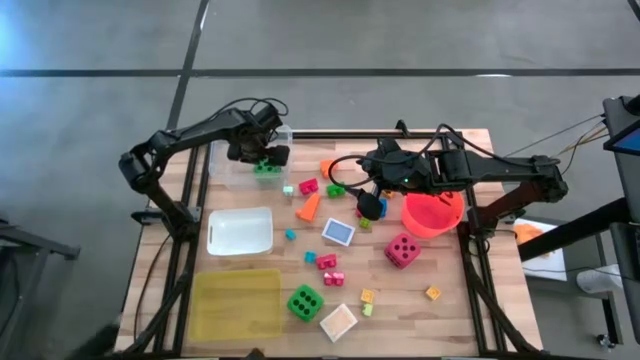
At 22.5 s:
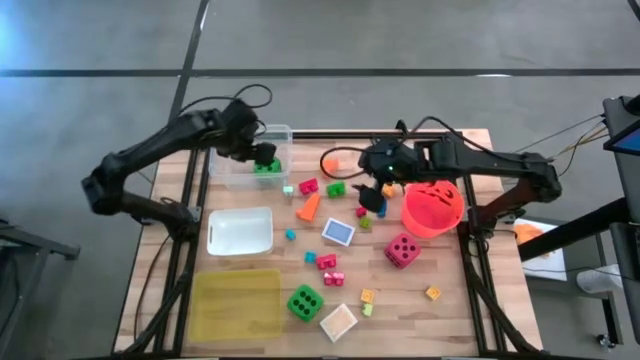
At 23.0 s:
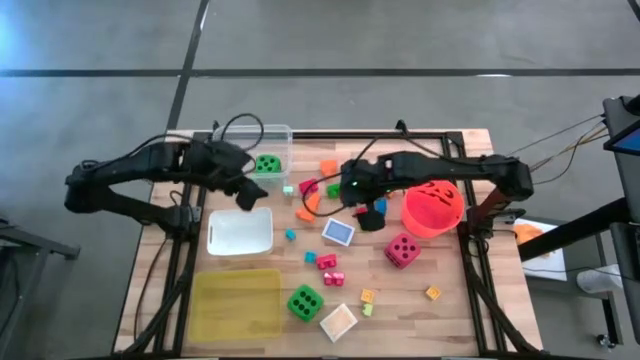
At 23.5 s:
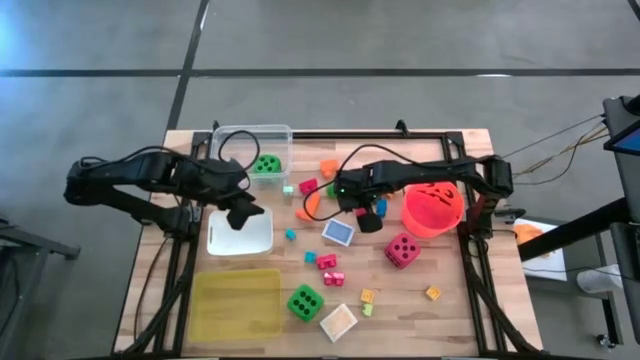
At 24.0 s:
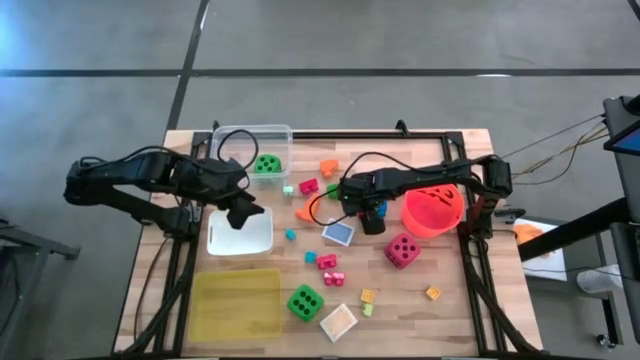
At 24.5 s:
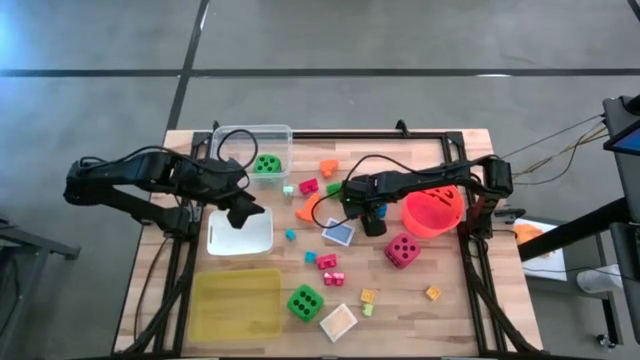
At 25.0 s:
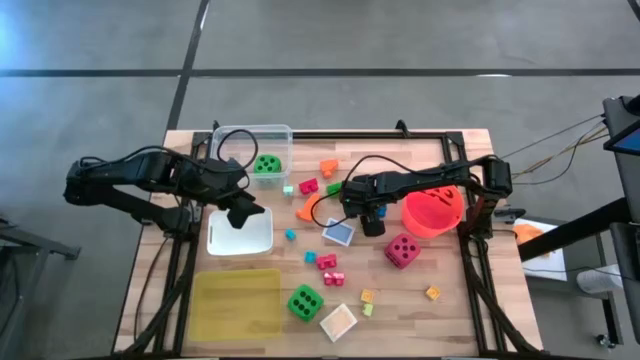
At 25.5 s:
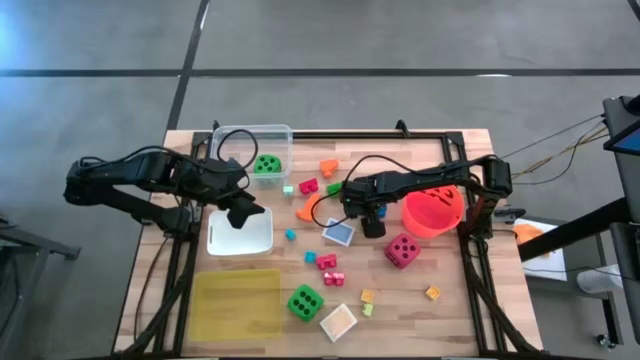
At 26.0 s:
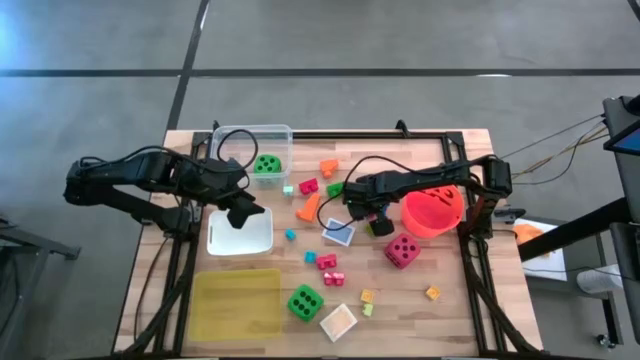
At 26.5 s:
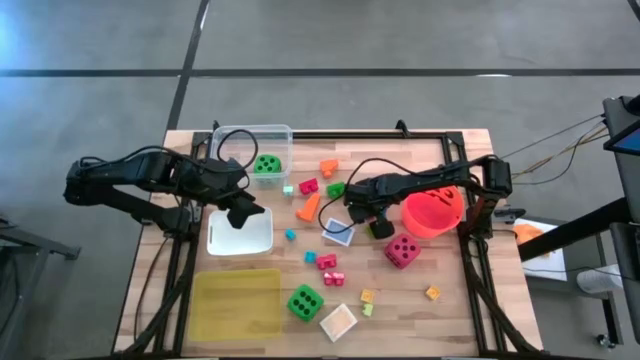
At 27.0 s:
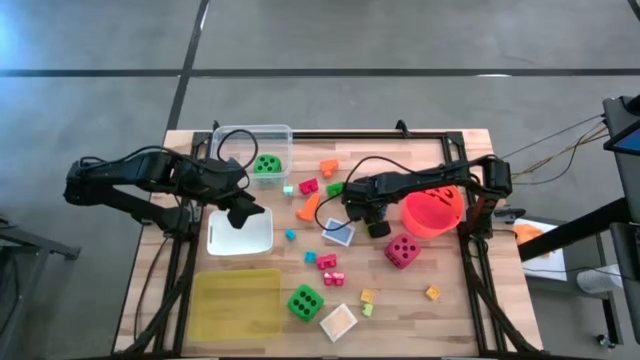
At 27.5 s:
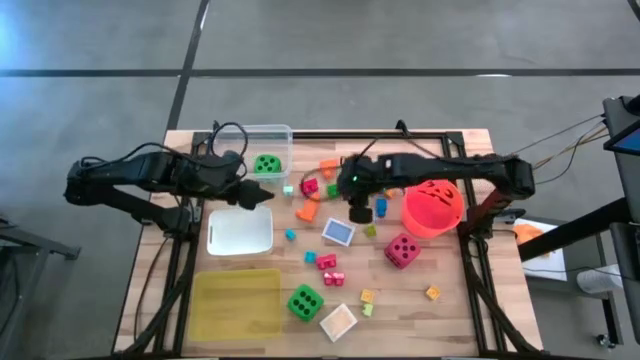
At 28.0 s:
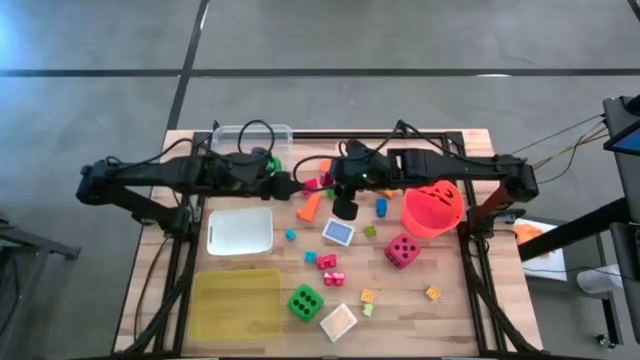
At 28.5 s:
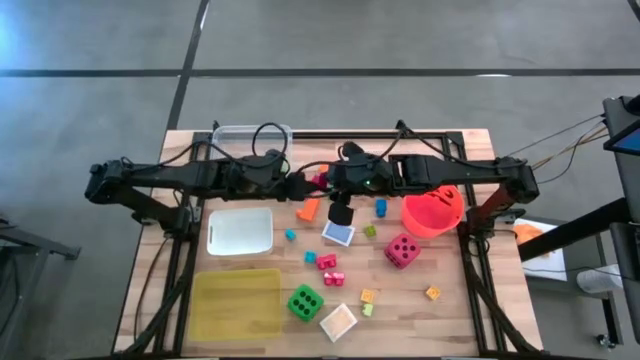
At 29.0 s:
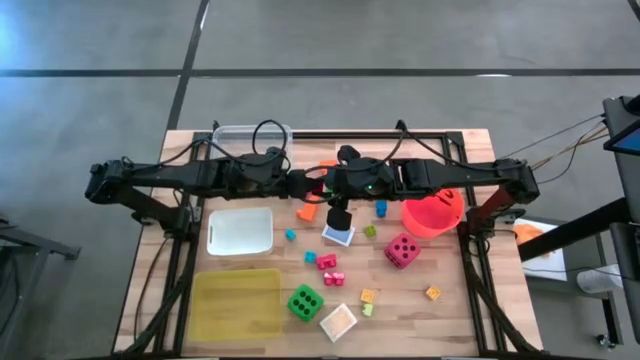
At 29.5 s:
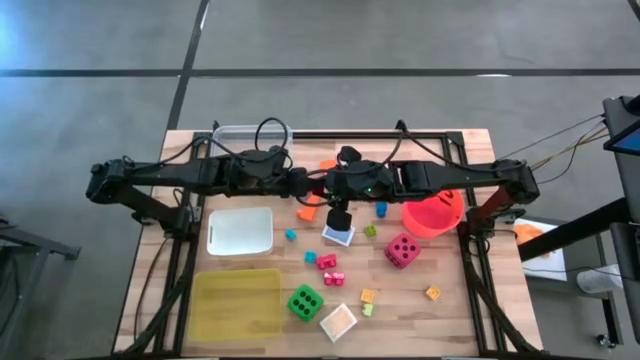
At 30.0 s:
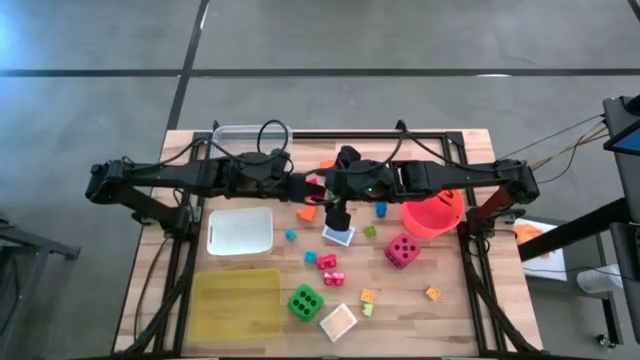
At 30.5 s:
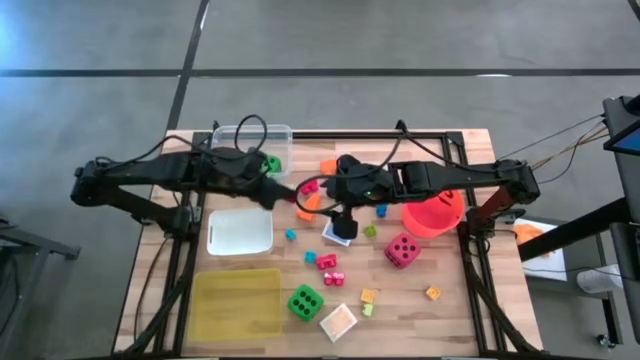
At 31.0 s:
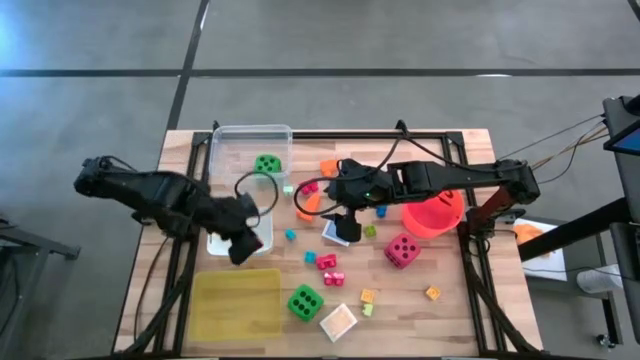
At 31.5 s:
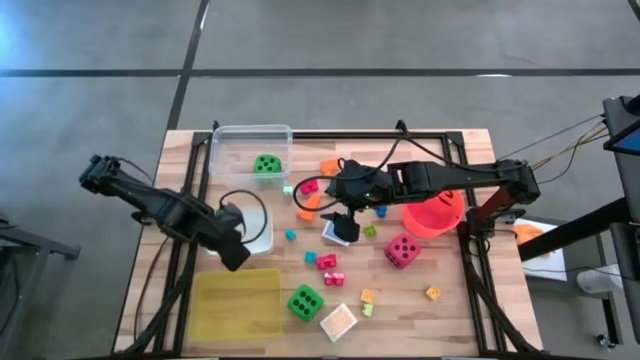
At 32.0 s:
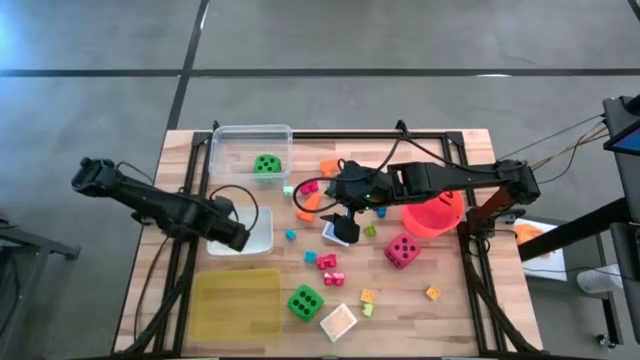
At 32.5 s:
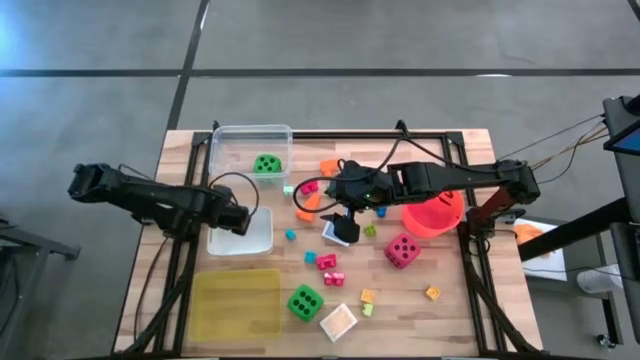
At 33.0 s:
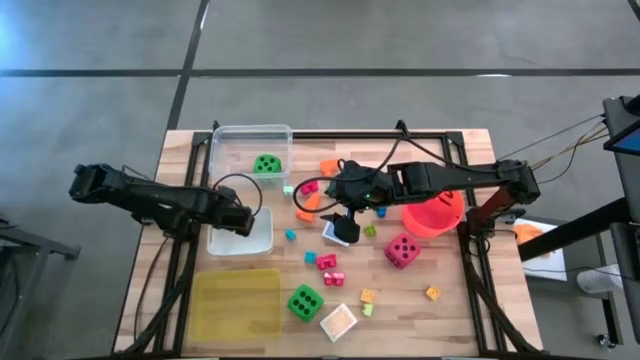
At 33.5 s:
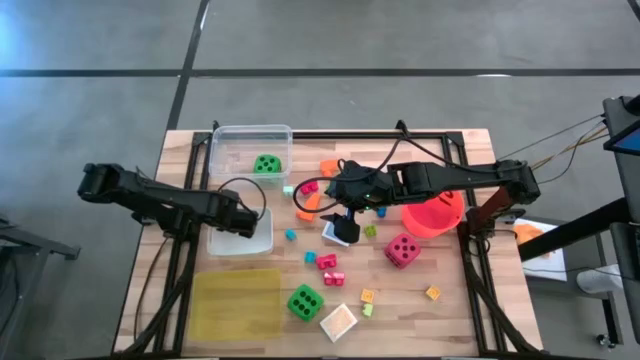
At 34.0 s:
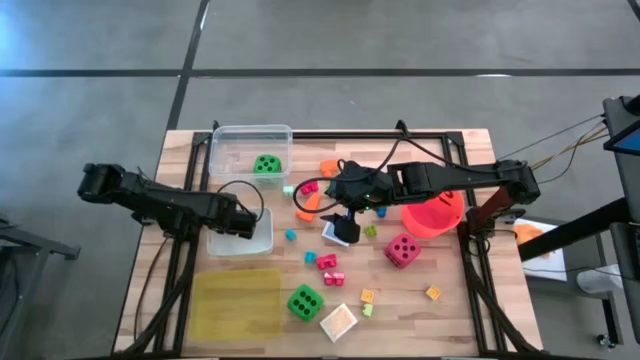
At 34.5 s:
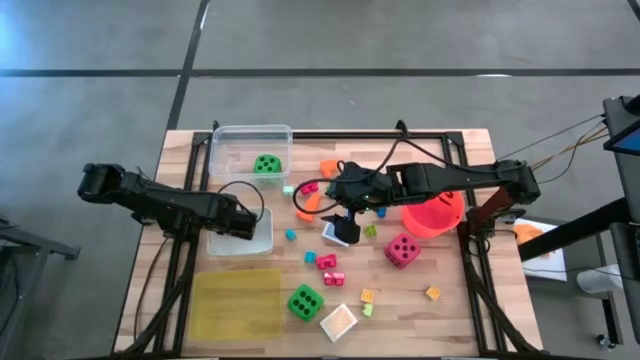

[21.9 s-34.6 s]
Task: Pick & Place Toys
Put the red game piece into the white bin

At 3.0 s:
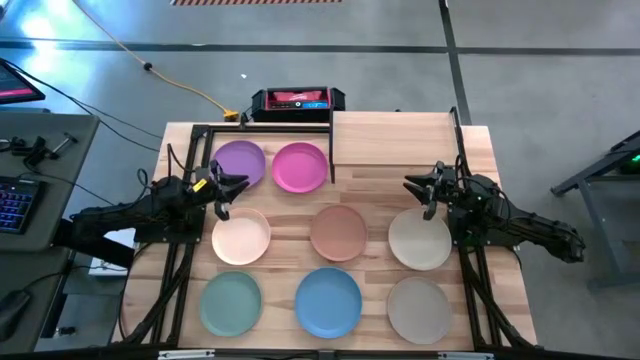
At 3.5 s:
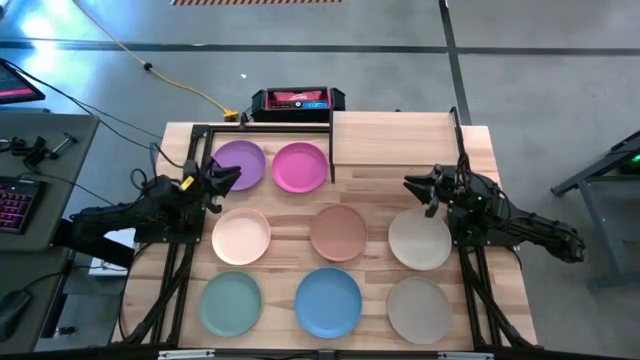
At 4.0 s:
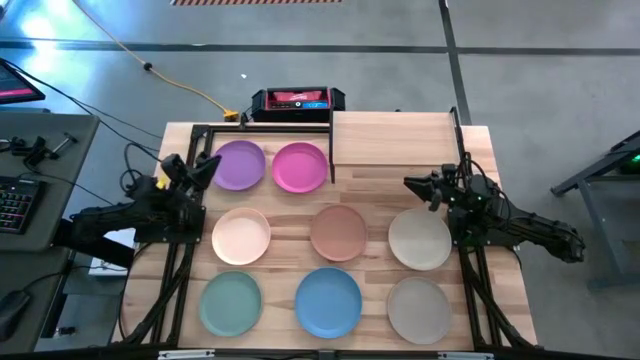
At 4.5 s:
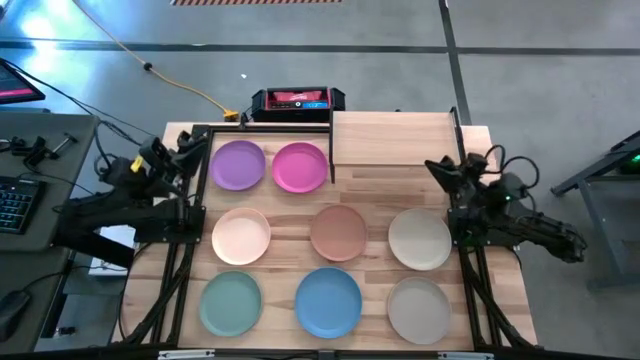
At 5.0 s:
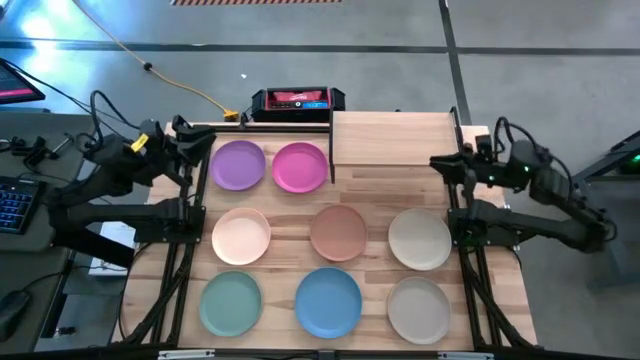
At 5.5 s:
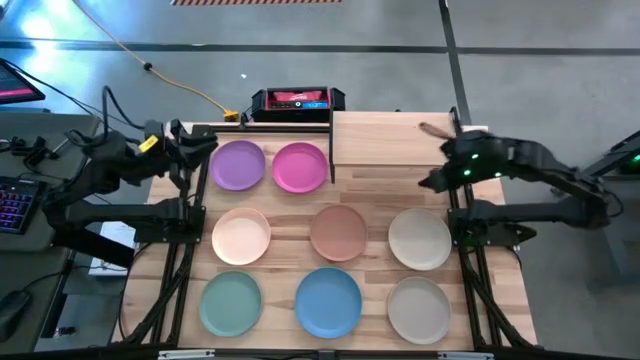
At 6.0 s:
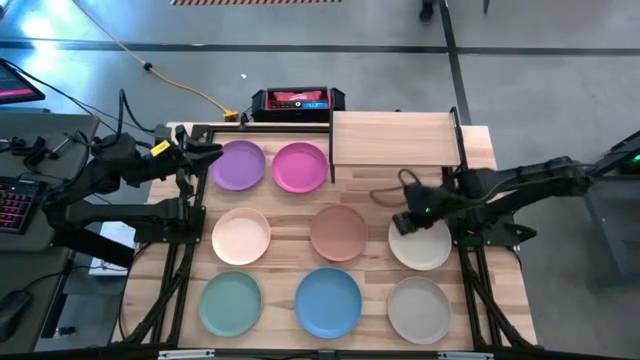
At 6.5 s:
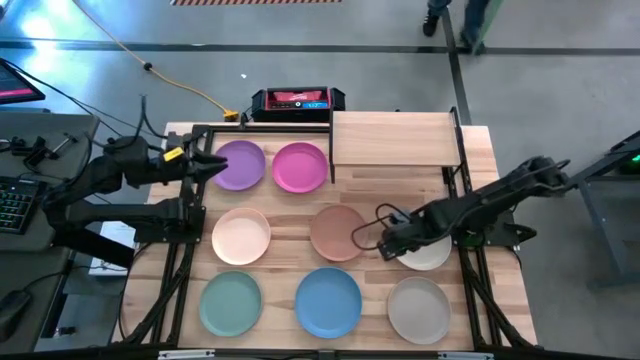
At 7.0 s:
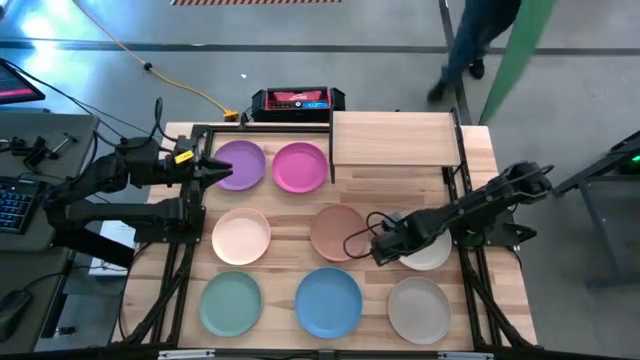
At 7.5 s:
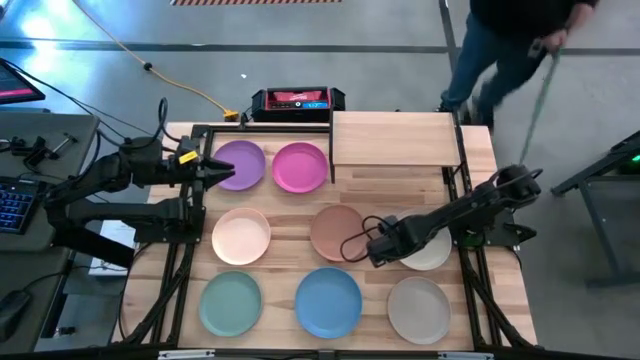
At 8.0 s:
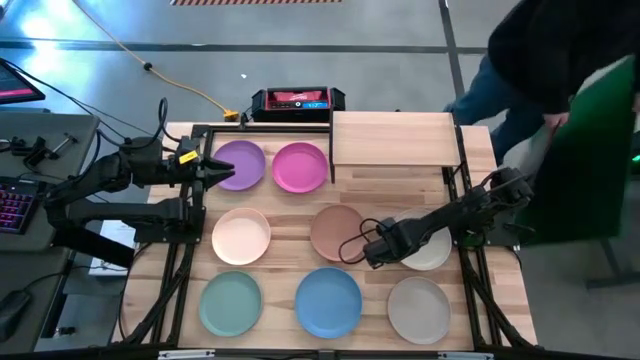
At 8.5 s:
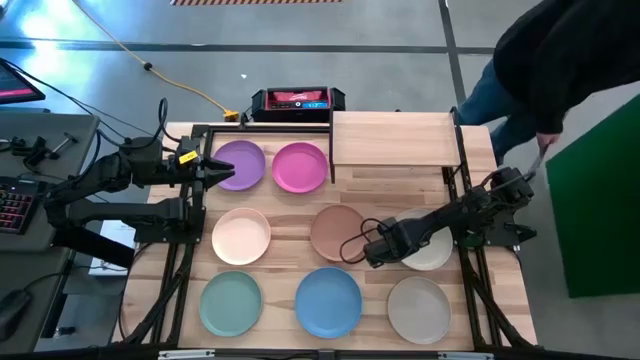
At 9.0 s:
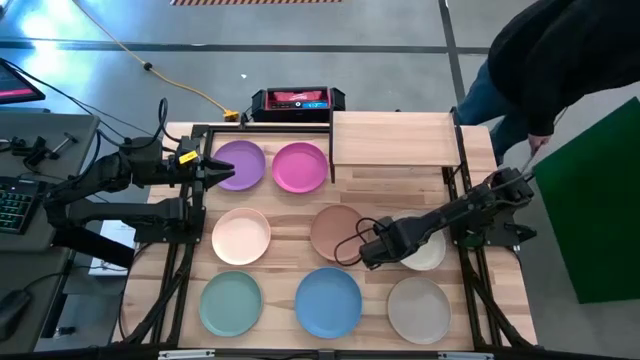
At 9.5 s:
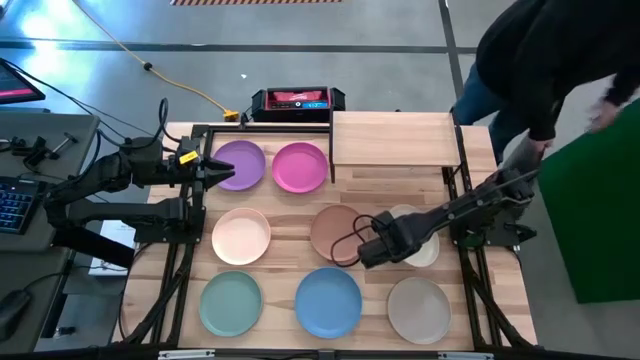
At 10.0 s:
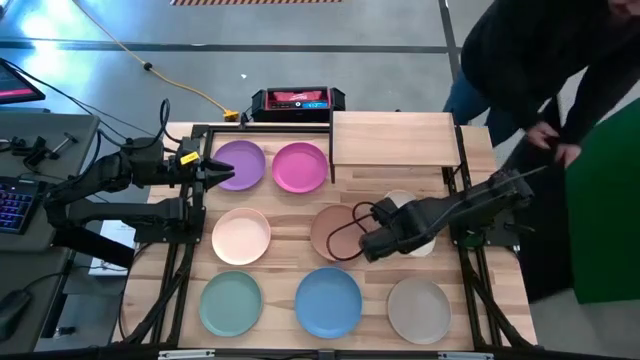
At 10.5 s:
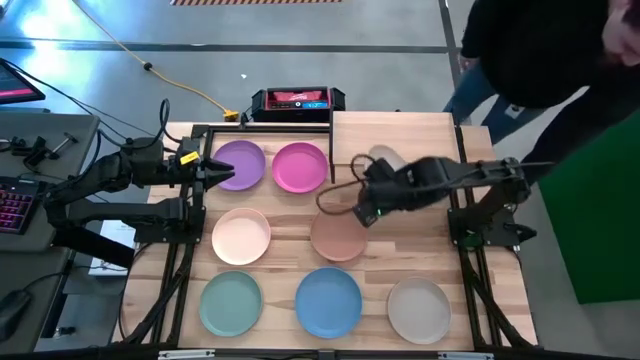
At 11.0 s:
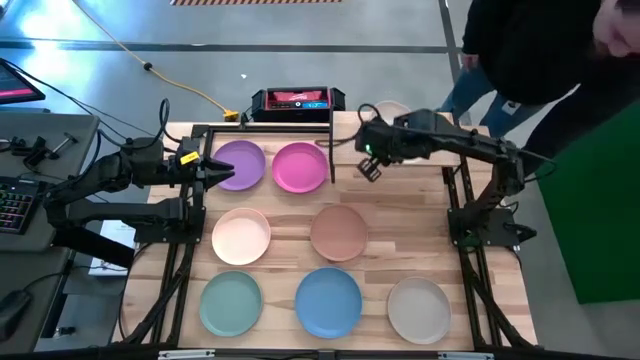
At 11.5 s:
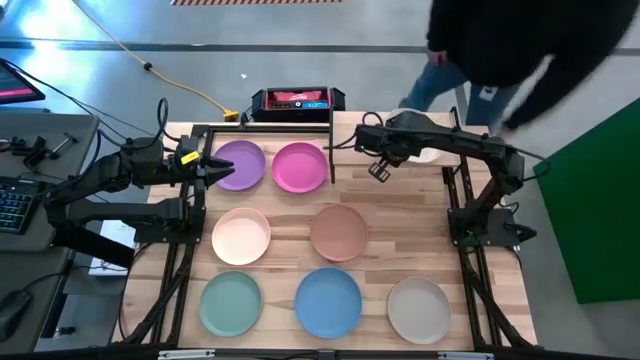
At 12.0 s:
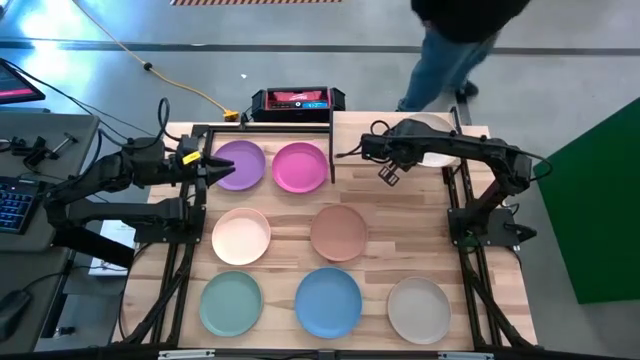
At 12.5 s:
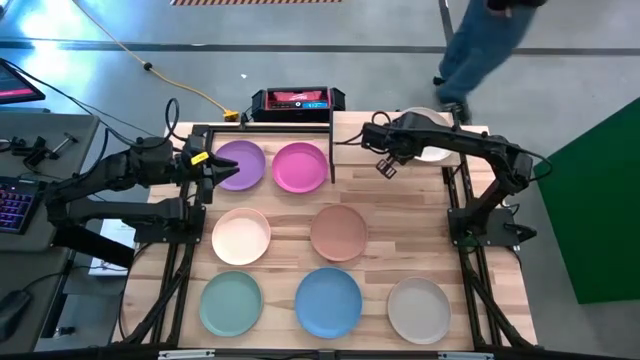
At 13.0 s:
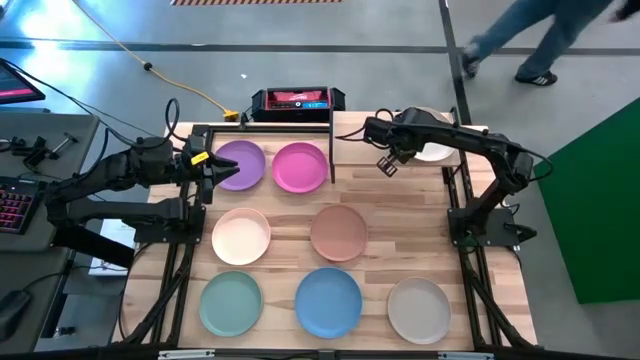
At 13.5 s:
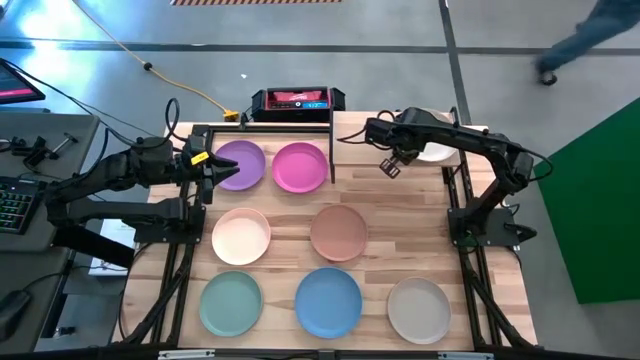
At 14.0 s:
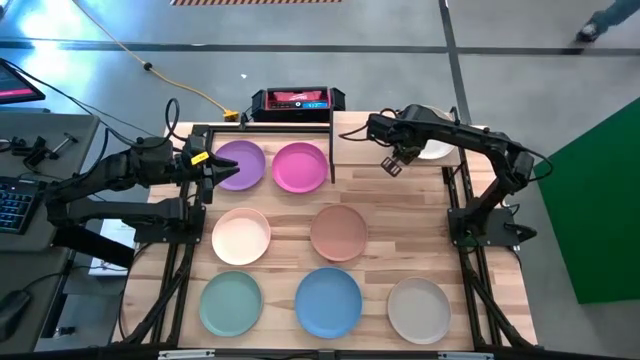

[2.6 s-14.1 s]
Task: Place and stack plates onto a shelf
Put the white plate on the shelf
